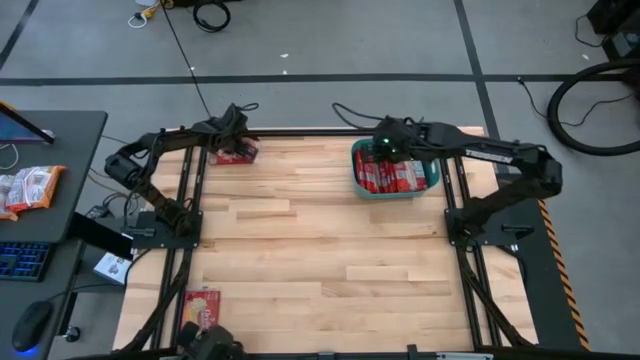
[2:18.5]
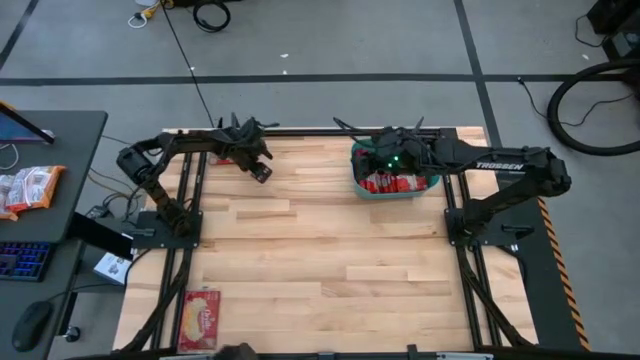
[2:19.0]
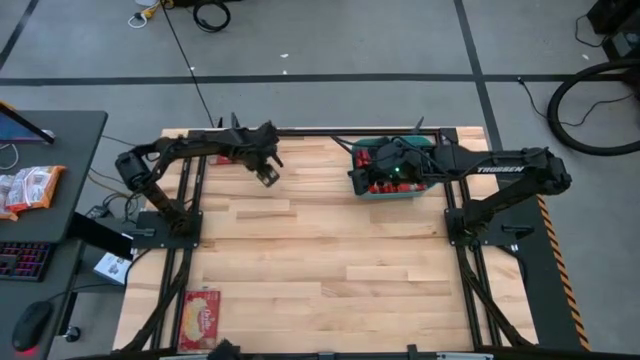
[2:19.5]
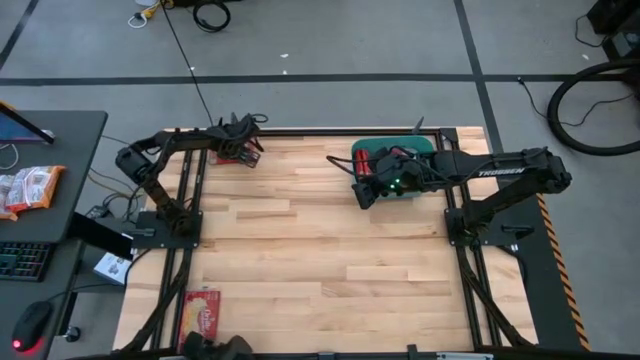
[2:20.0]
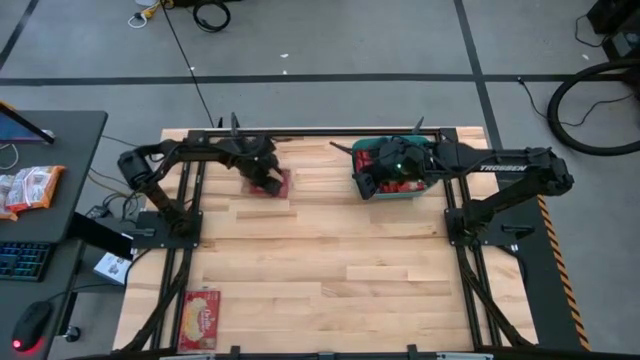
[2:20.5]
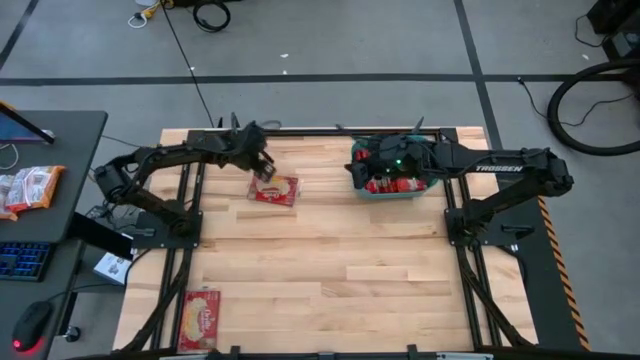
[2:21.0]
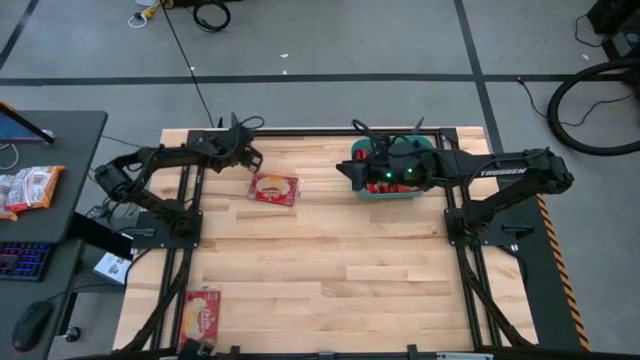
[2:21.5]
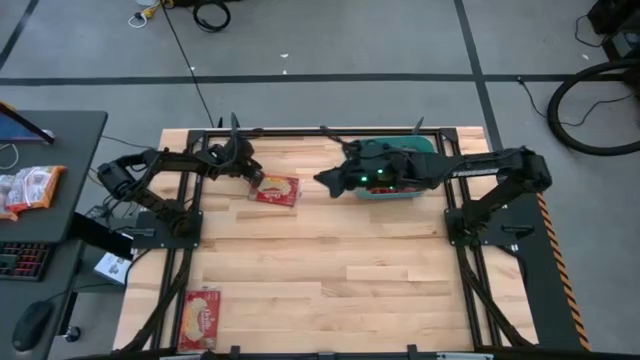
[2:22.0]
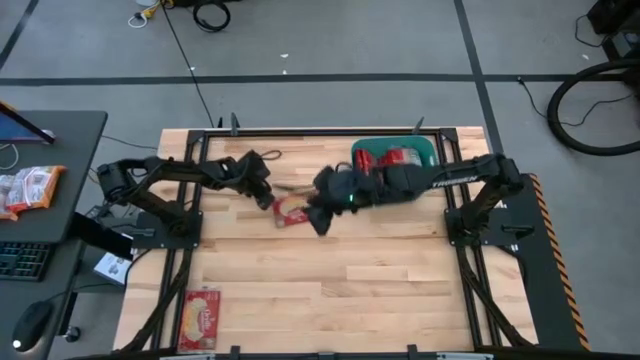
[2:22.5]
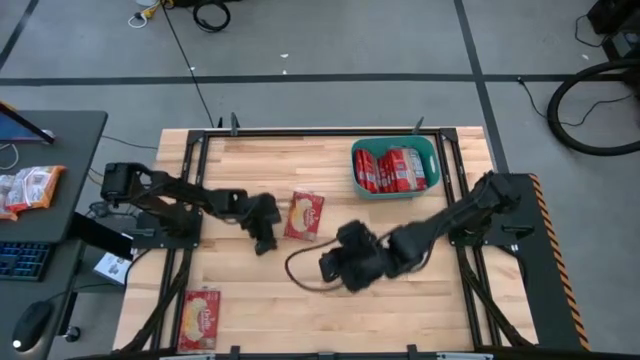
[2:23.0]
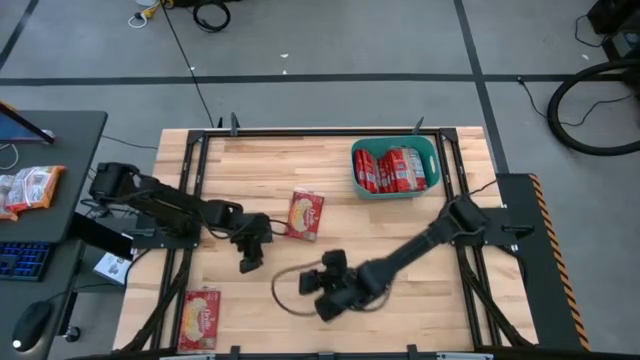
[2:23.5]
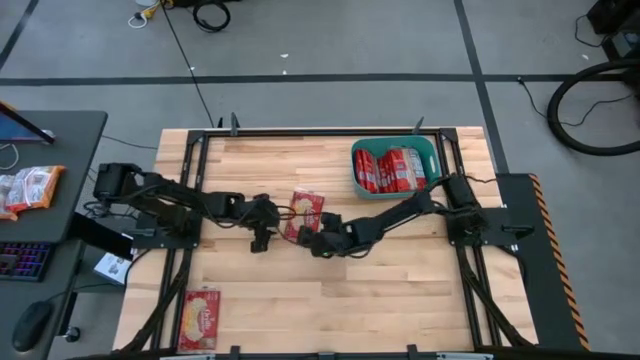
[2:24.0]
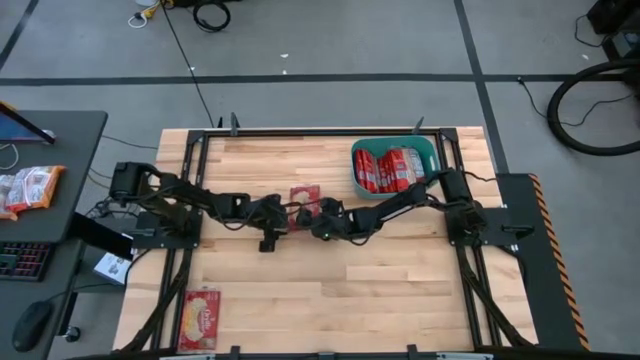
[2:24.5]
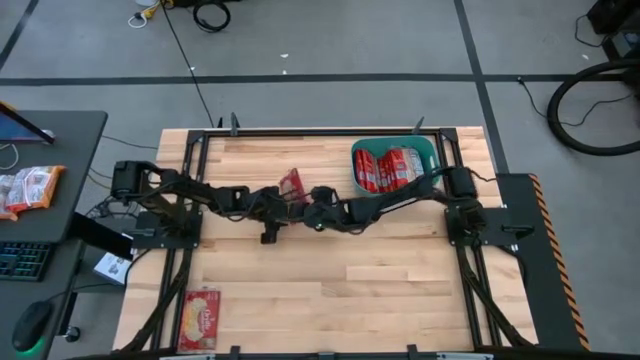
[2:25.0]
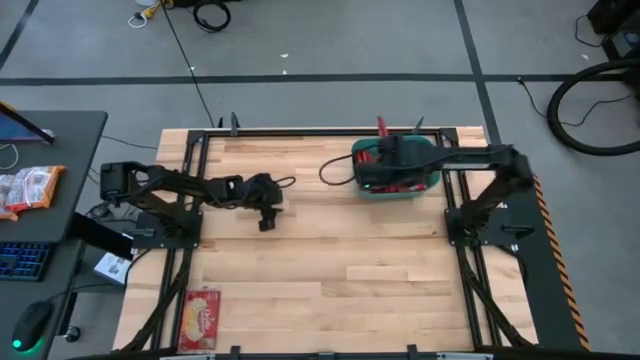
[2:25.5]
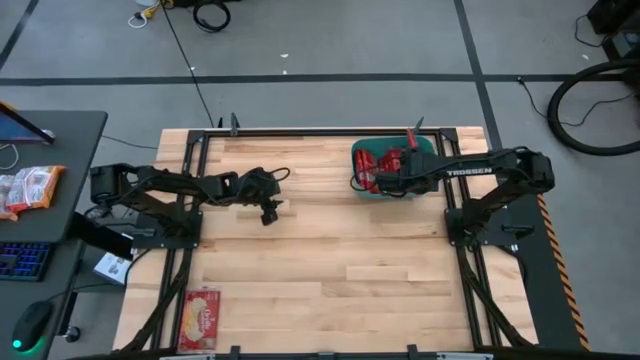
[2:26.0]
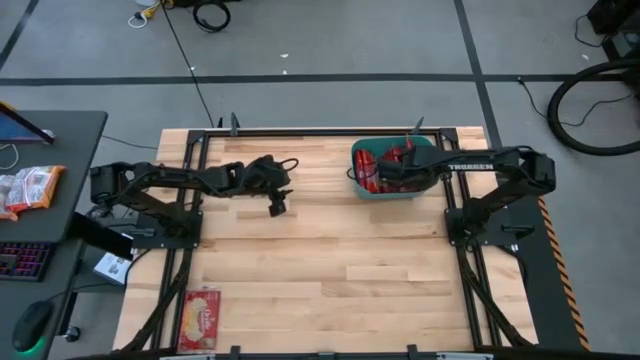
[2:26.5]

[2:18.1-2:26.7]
Task: Sort popcorn bags into baskets
Put the top popcorn bag into the bin
